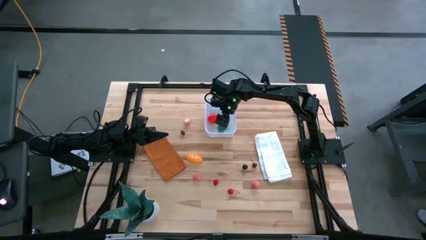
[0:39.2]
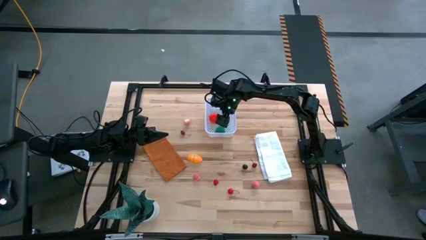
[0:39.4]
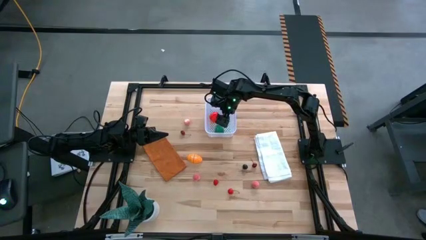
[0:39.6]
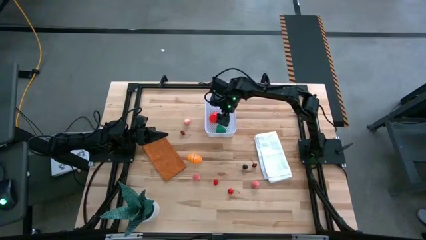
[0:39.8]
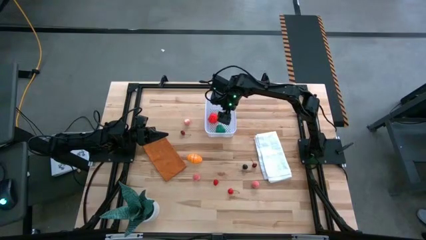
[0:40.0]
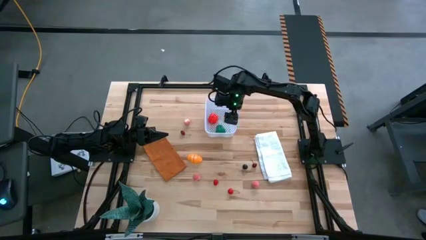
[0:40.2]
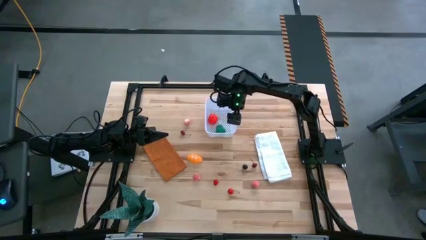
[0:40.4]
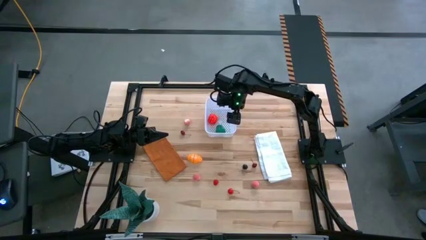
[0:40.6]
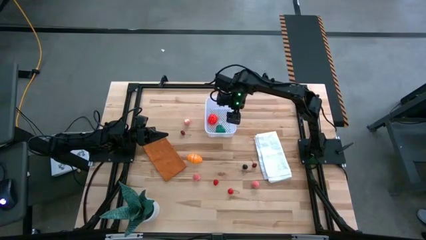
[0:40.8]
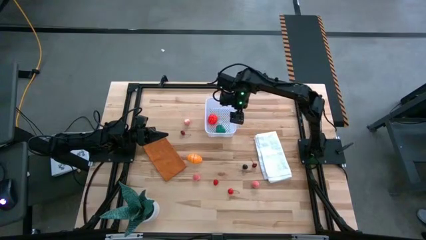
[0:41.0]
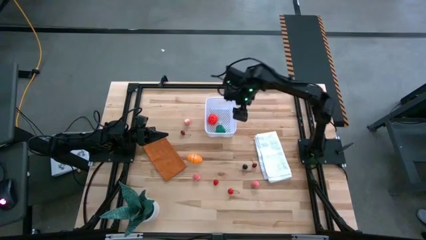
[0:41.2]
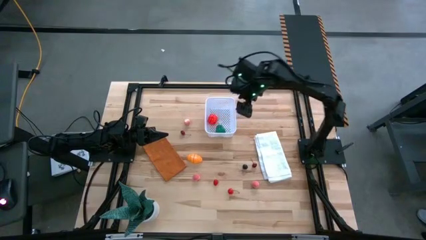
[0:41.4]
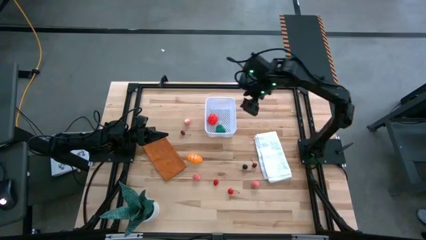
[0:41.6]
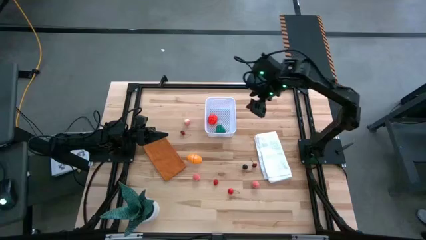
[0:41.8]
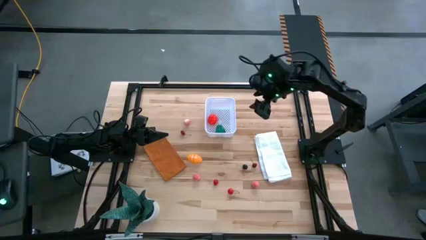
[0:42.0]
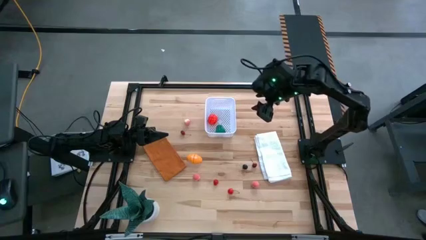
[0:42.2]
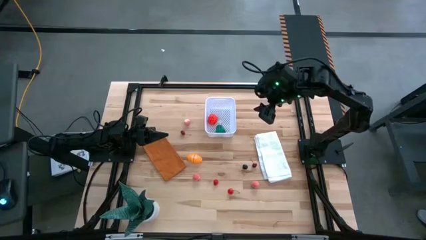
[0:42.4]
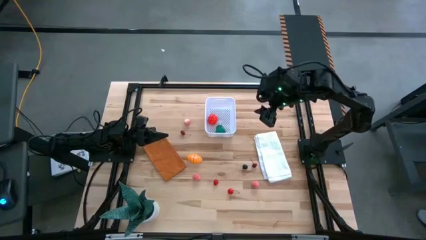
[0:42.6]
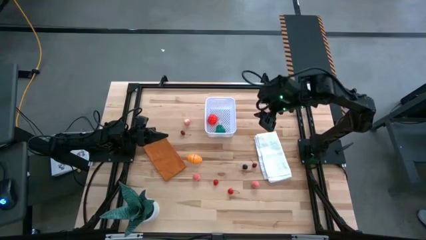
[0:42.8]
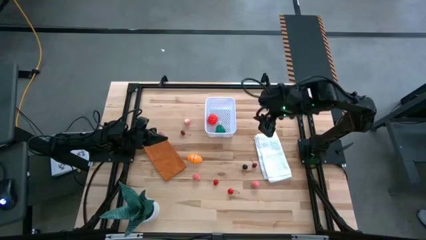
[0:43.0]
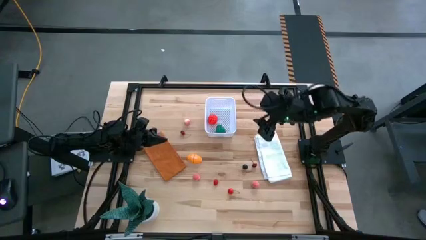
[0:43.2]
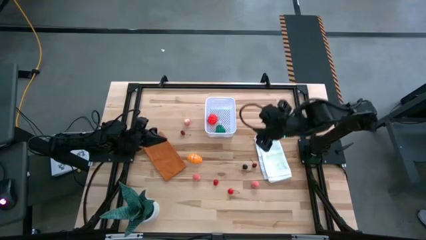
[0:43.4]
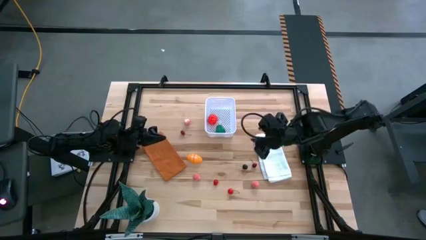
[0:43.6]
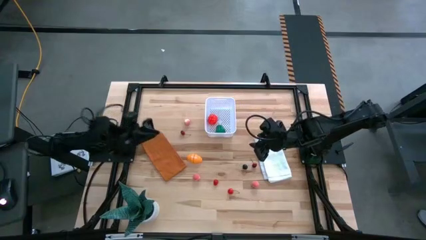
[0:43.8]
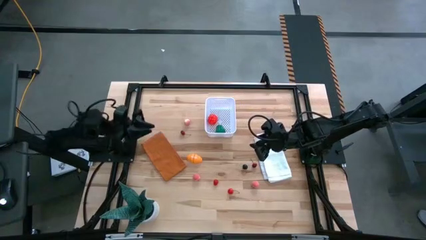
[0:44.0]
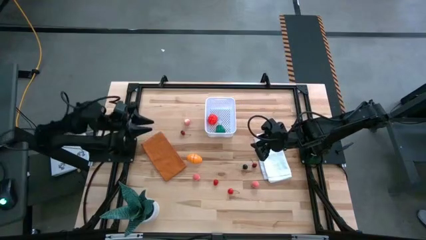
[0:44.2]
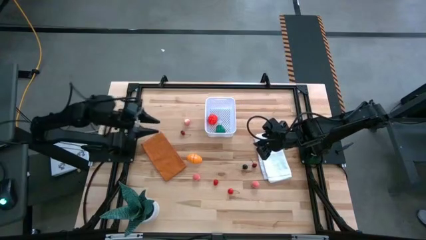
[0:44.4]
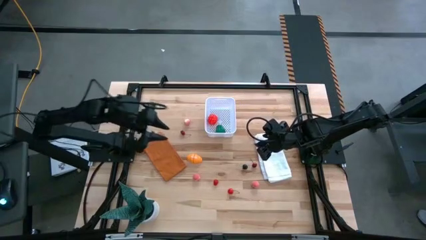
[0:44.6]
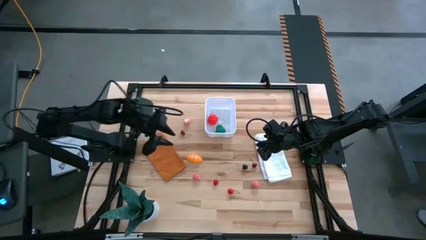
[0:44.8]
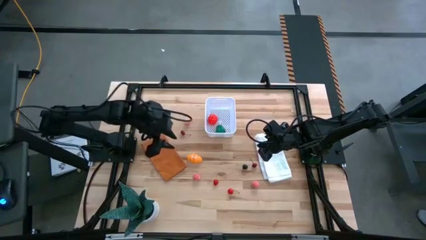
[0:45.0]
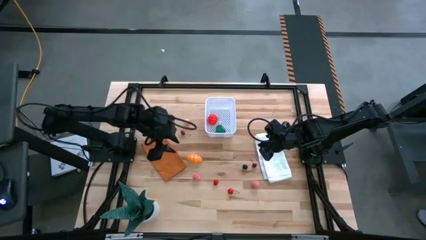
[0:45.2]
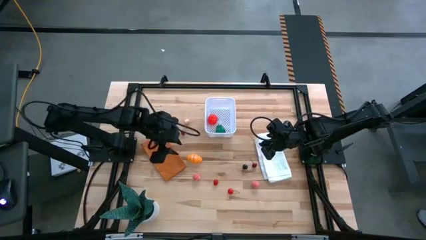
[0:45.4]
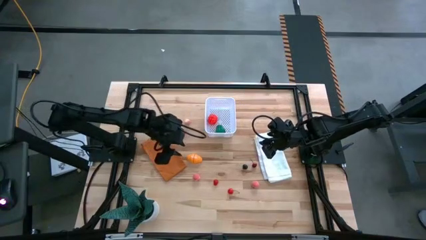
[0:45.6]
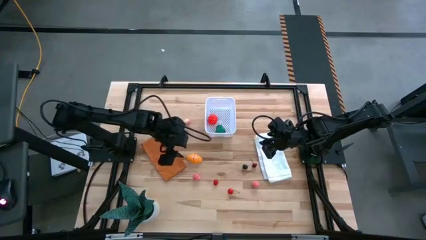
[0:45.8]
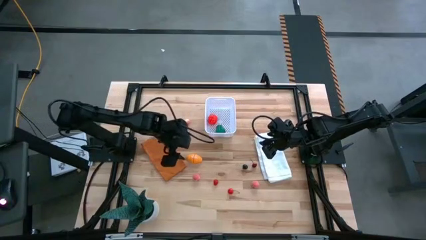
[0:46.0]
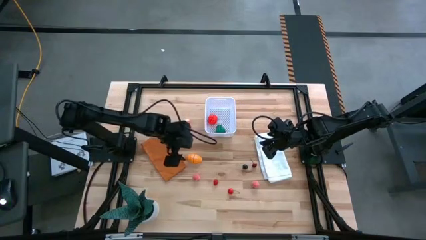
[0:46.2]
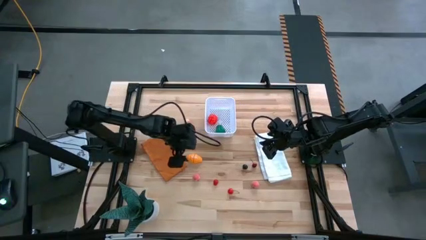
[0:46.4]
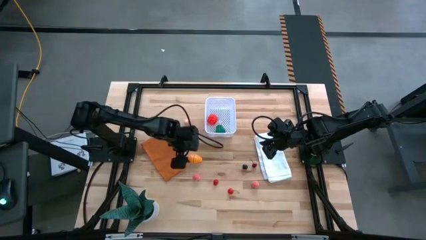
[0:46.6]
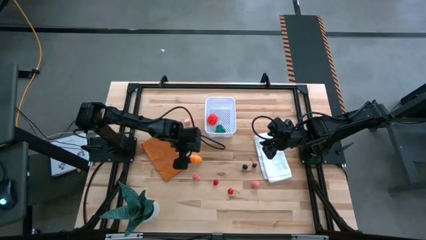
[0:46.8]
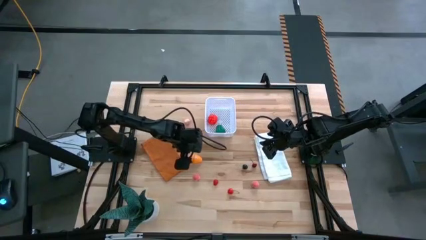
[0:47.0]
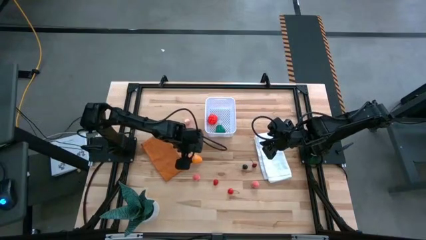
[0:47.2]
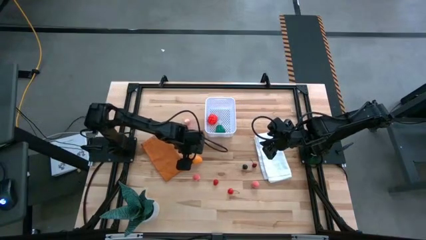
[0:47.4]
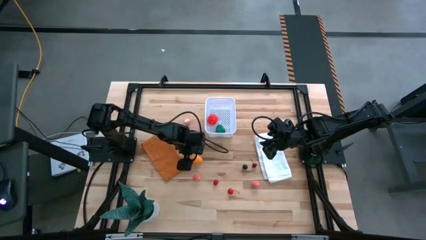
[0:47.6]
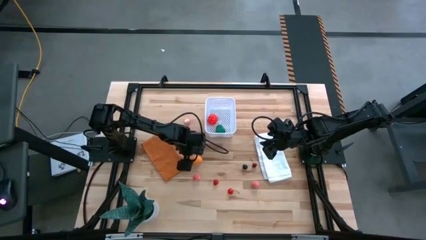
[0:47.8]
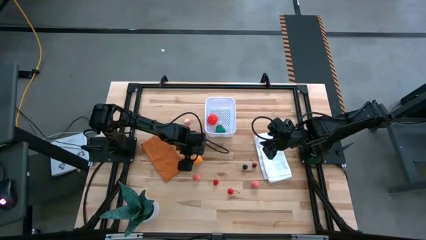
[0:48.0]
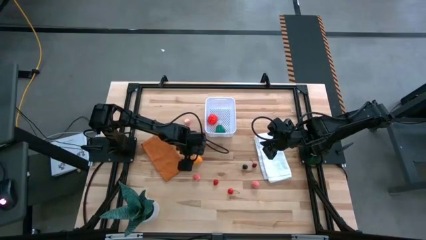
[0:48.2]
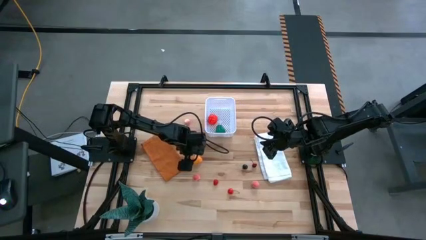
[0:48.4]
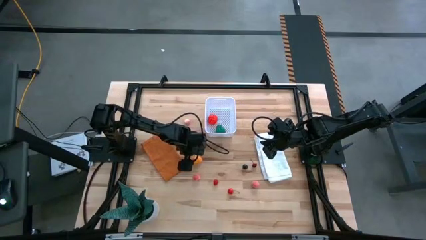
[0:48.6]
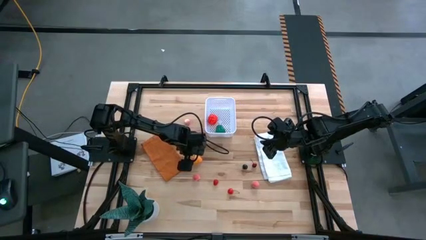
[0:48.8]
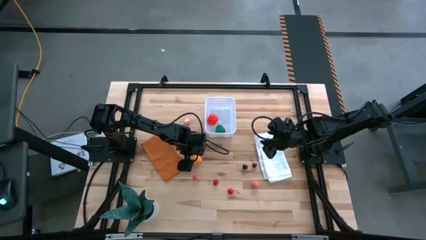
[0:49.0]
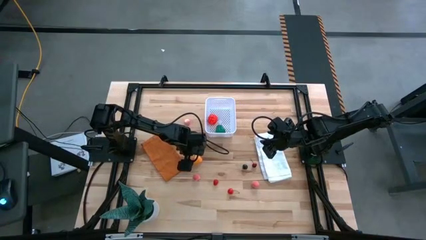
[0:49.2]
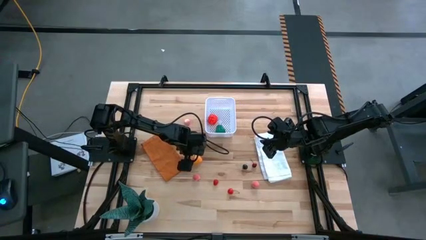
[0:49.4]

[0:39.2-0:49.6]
Task: Pick and placing Produce into tupperware
Put the croissant into the white bin

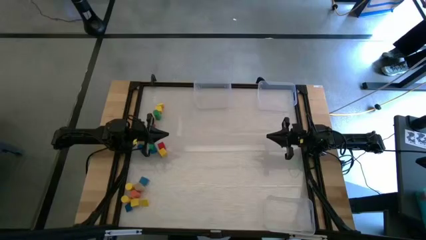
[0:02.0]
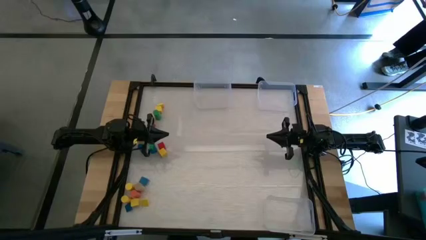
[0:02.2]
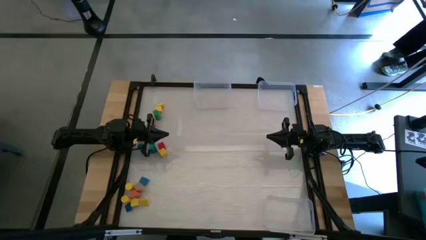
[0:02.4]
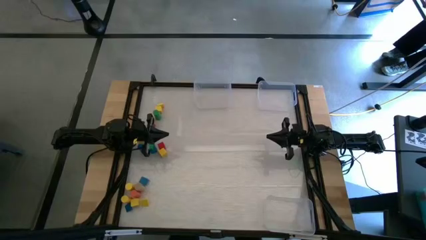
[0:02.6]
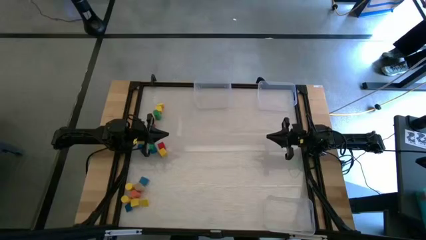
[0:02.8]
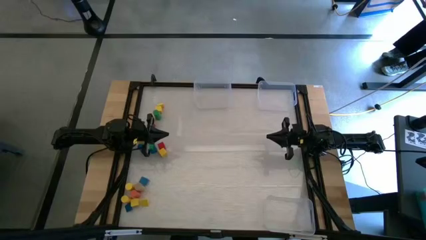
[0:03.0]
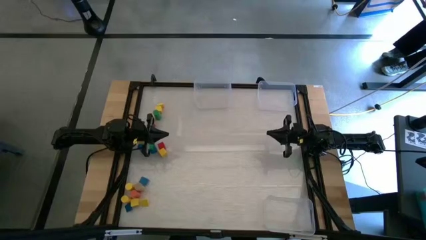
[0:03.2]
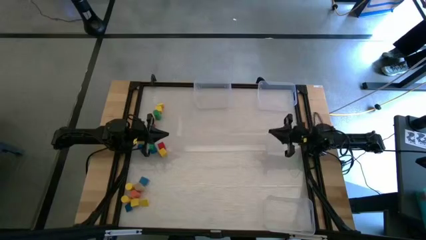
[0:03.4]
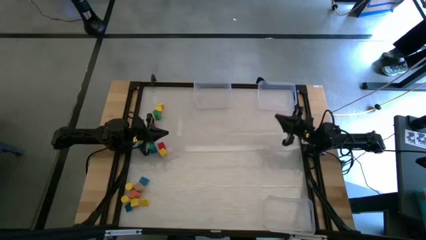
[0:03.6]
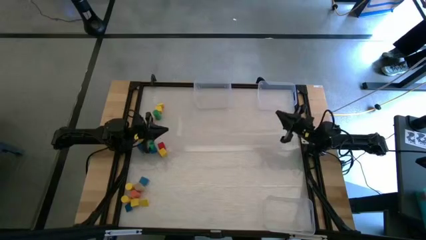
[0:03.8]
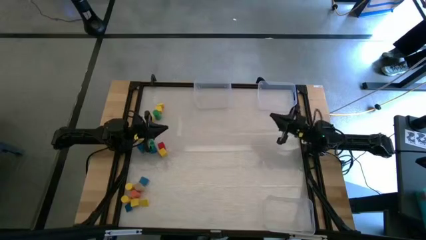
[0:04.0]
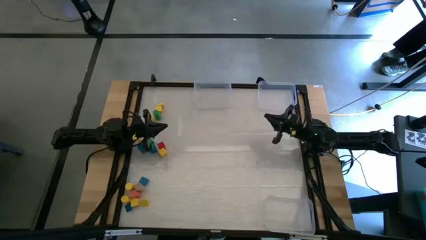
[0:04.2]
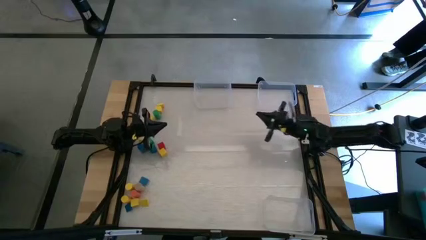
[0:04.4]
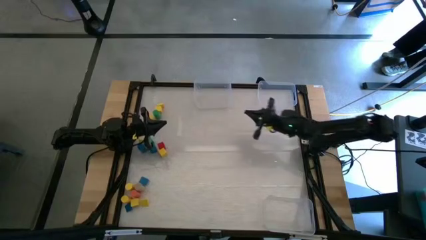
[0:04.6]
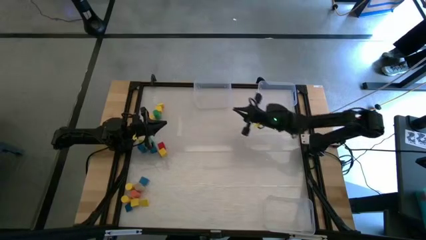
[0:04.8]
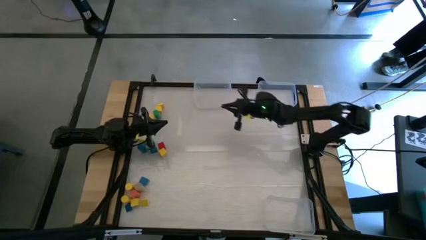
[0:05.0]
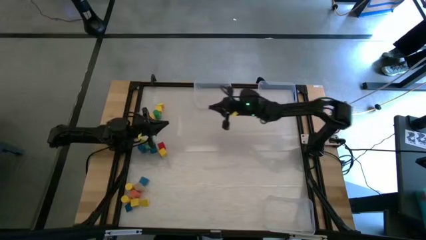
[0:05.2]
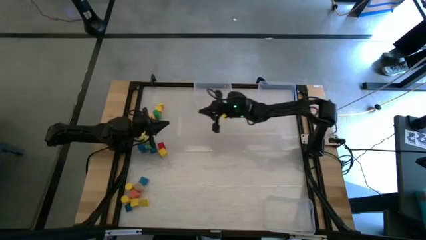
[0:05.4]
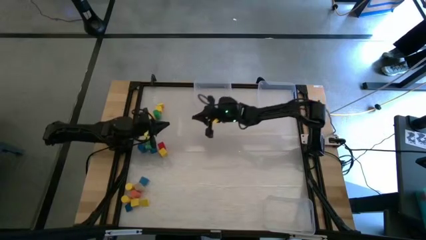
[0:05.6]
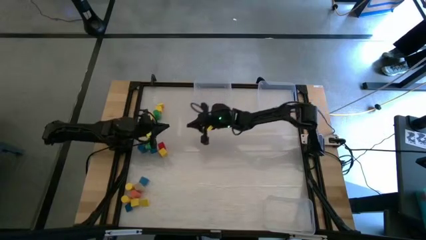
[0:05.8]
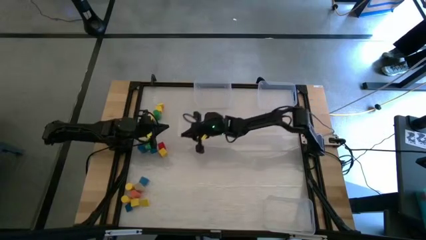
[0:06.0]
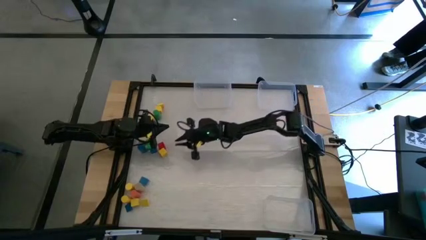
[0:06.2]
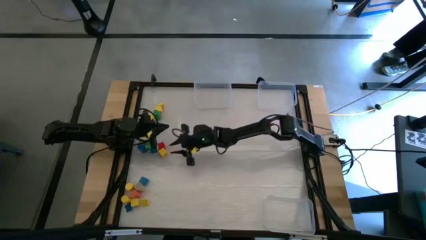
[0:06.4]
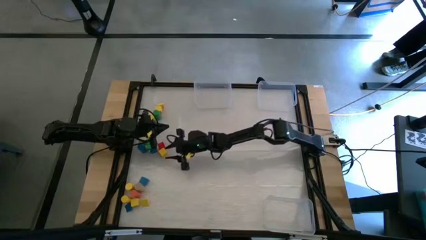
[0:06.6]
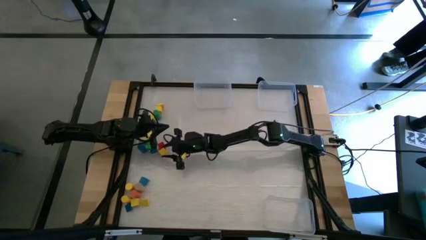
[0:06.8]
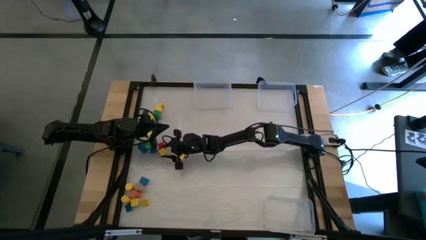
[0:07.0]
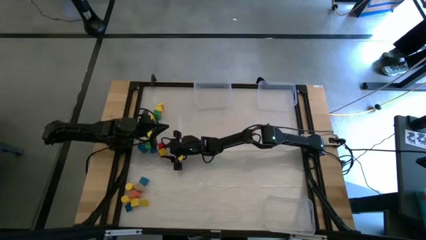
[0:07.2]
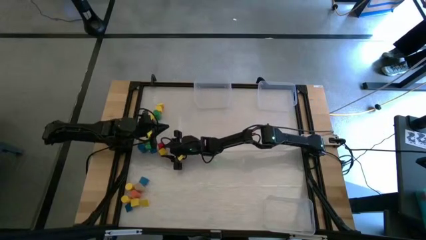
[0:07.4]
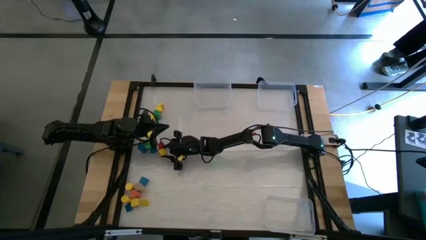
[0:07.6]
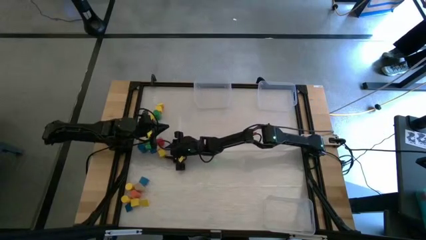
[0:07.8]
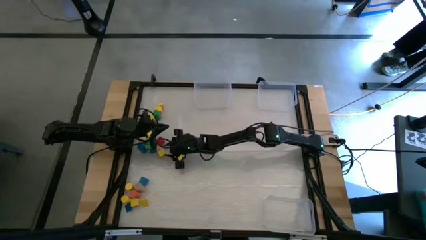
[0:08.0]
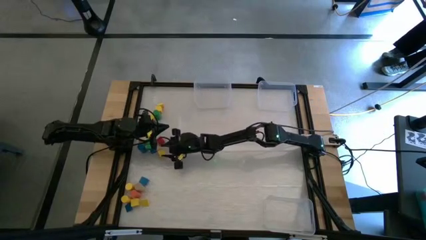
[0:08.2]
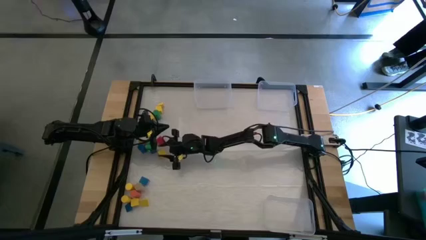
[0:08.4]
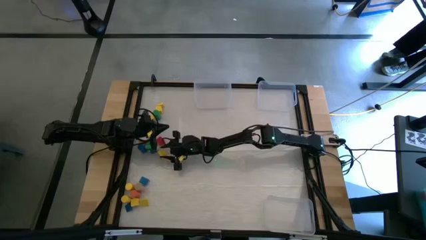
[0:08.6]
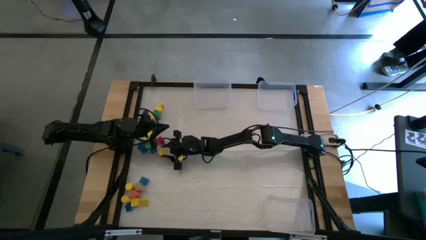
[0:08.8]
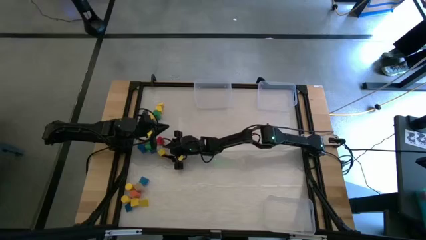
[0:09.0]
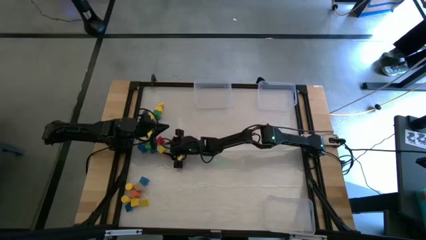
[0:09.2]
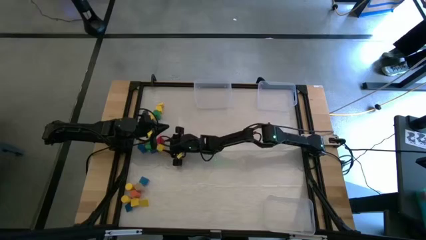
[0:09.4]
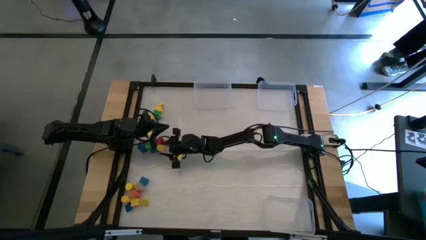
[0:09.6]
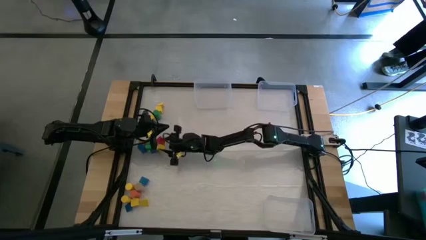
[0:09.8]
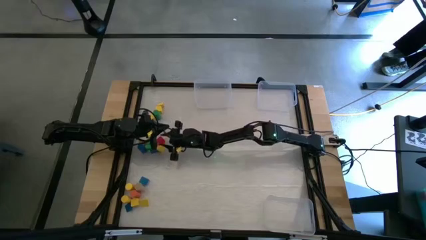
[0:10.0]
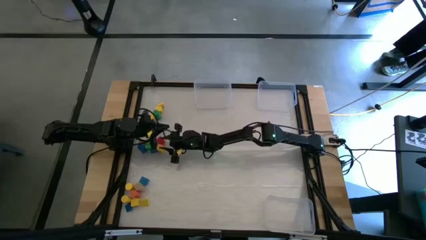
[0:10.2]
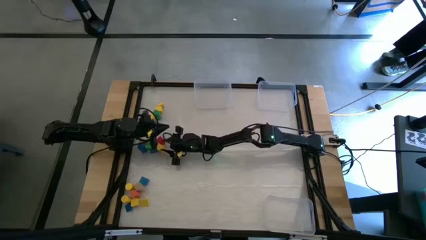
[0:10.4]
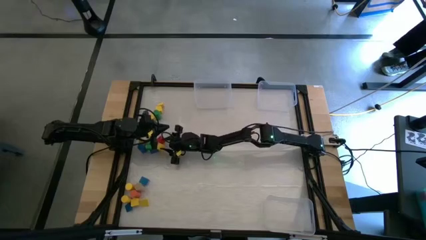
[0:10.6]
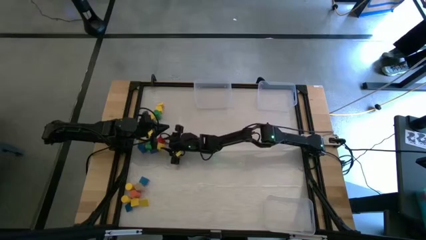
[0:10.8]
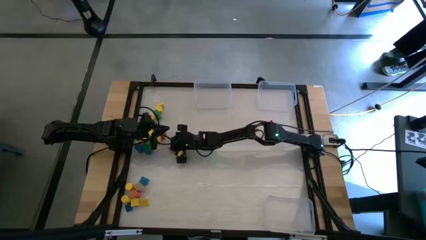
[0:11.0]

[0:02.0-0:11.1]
Task: Sort blocks by size
Put the square yellow block into the top left transparent bin
